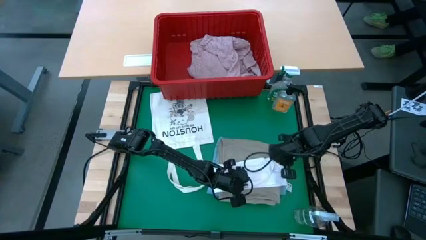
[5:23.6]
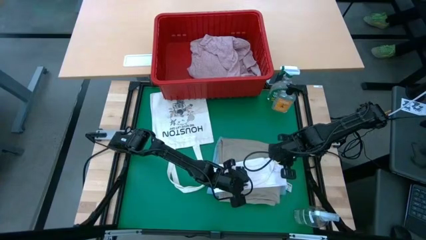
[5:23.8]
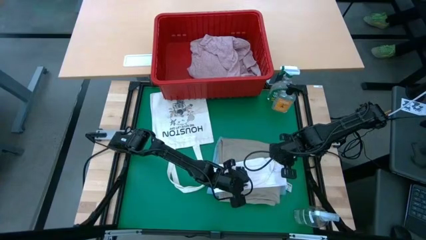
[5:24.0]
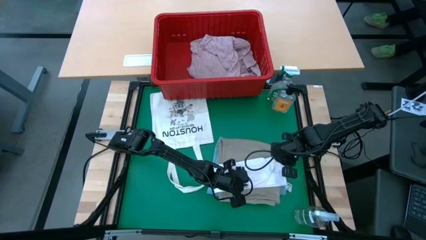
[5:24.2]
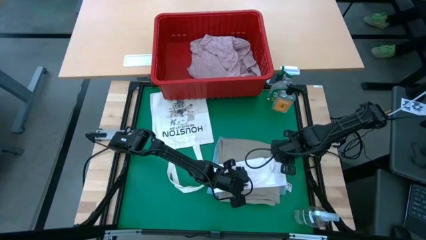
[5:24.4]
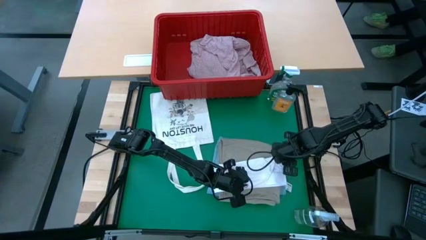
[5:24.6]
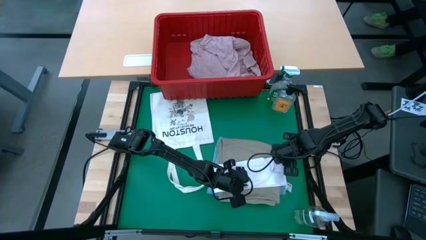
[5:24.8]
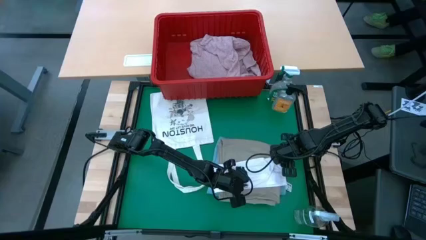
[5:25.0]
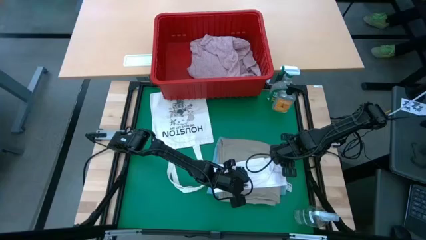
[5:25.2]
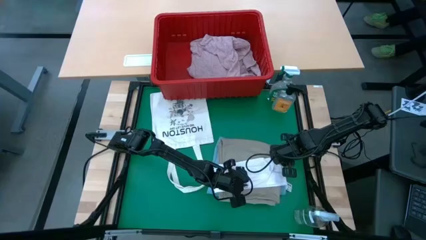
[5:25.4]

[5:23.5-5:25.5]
Task: Fold laundry
Fold the white underwear

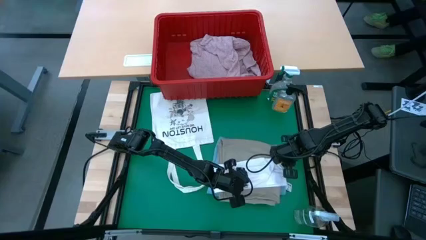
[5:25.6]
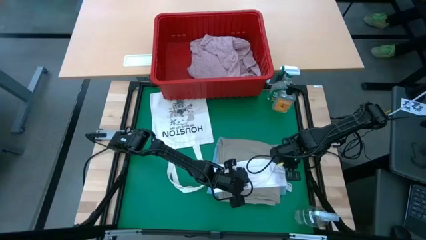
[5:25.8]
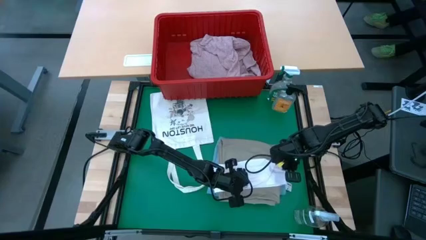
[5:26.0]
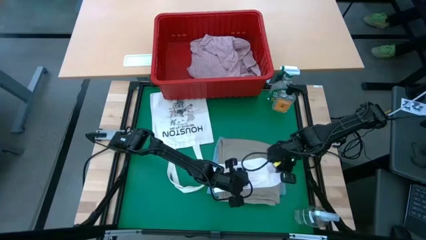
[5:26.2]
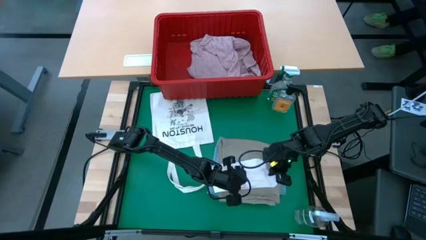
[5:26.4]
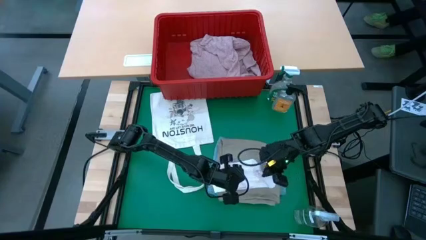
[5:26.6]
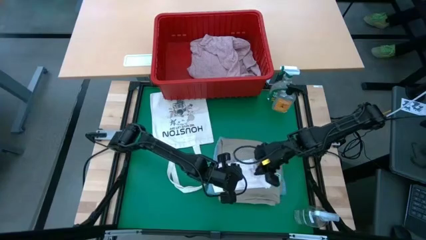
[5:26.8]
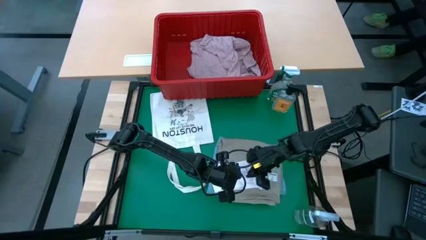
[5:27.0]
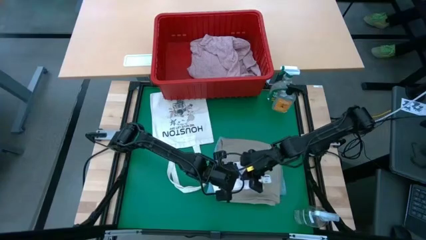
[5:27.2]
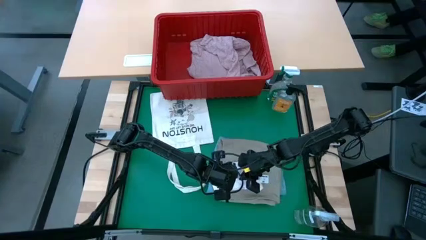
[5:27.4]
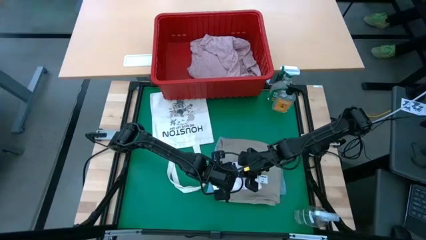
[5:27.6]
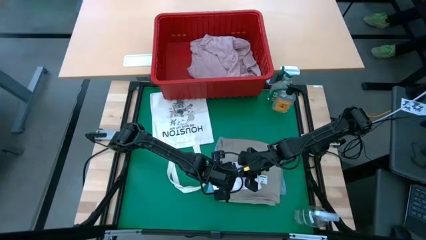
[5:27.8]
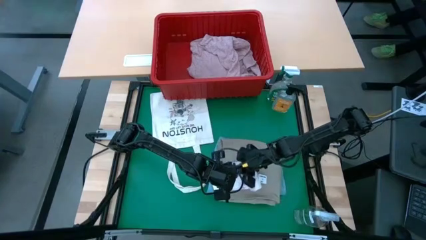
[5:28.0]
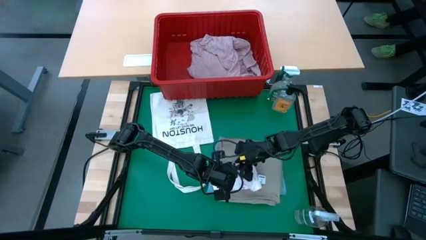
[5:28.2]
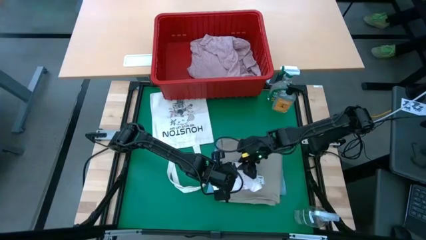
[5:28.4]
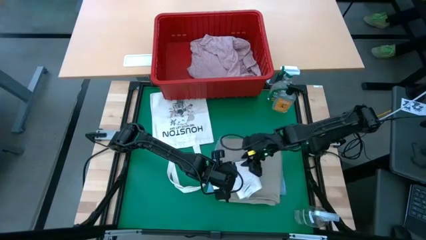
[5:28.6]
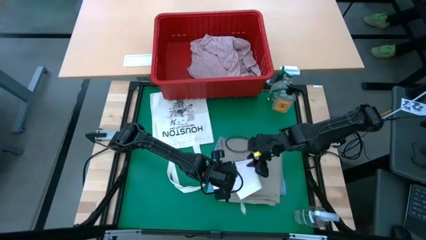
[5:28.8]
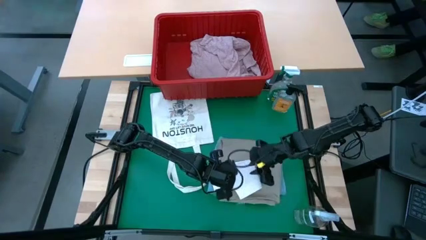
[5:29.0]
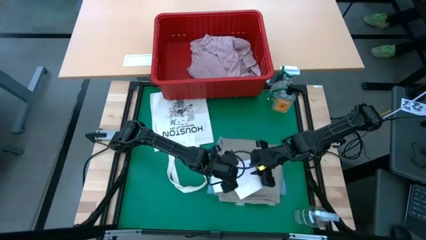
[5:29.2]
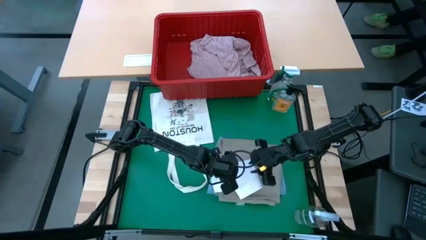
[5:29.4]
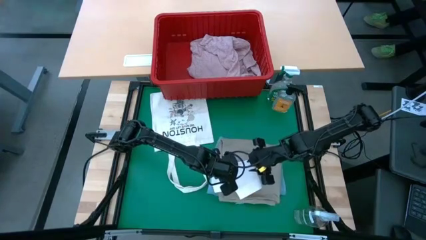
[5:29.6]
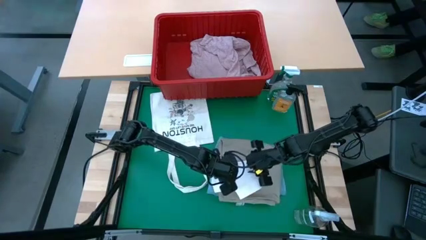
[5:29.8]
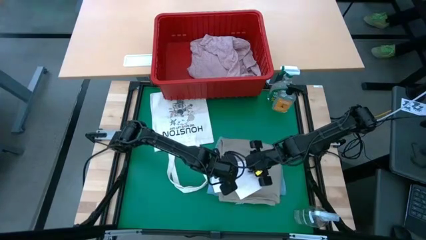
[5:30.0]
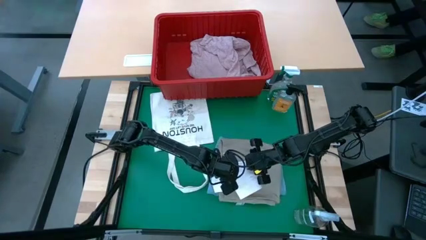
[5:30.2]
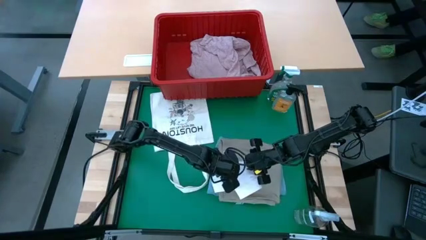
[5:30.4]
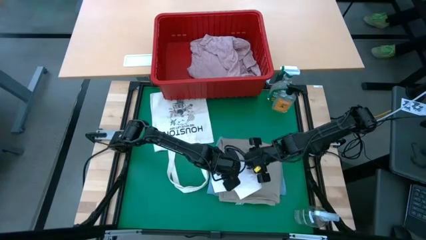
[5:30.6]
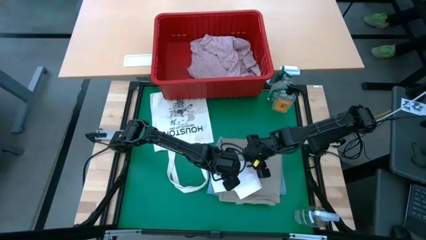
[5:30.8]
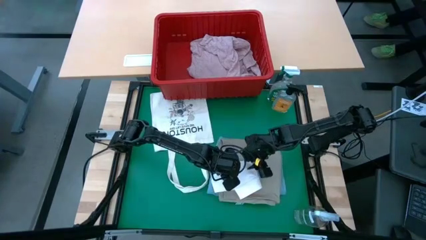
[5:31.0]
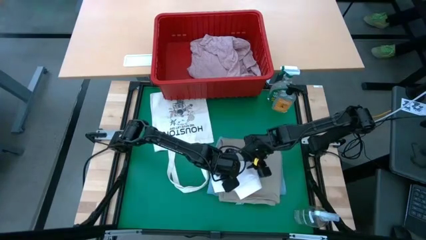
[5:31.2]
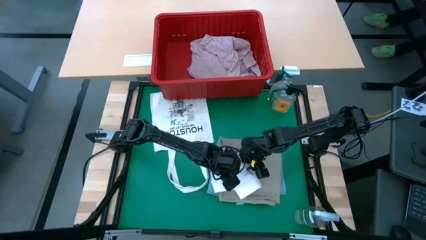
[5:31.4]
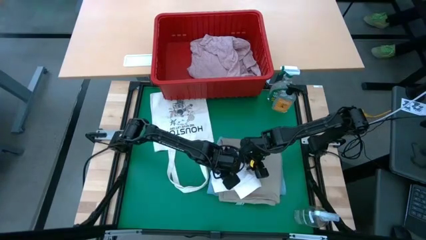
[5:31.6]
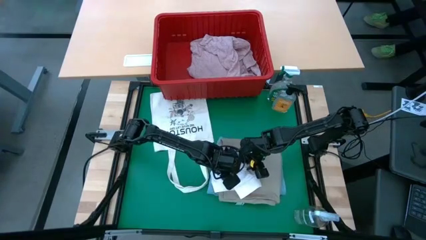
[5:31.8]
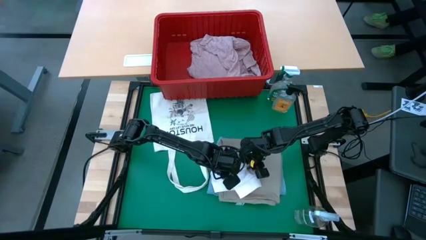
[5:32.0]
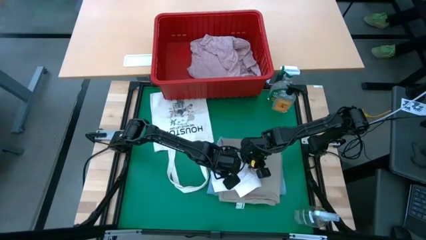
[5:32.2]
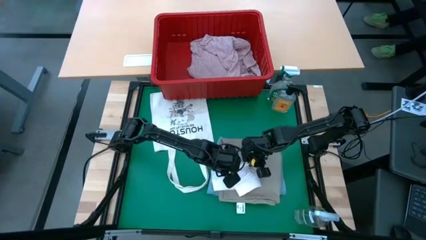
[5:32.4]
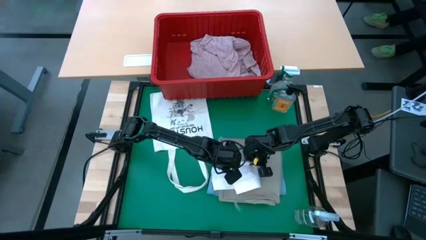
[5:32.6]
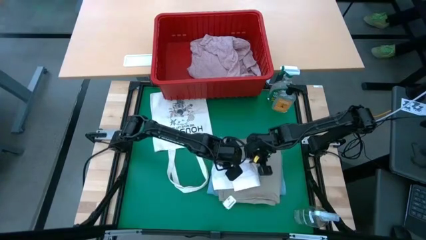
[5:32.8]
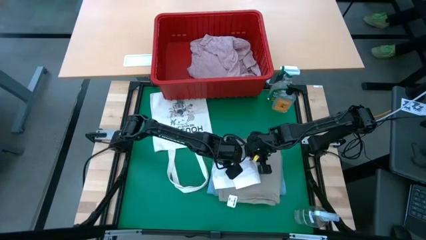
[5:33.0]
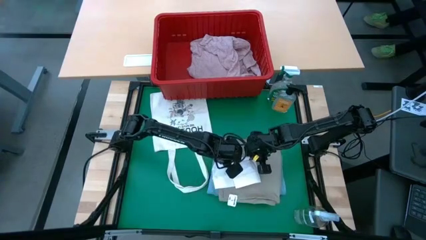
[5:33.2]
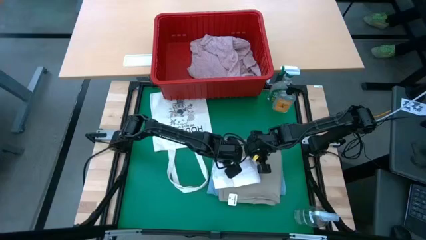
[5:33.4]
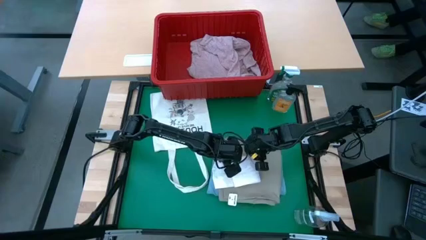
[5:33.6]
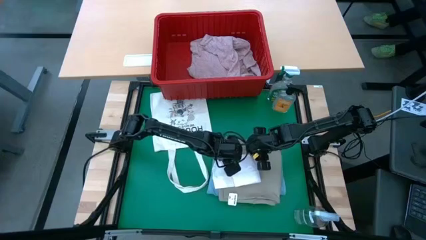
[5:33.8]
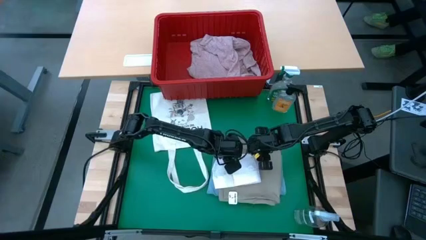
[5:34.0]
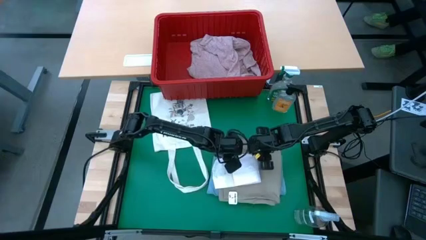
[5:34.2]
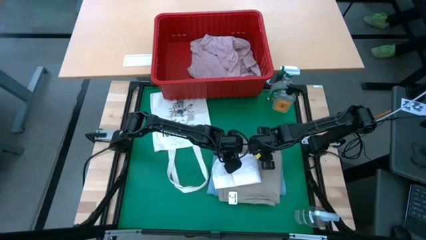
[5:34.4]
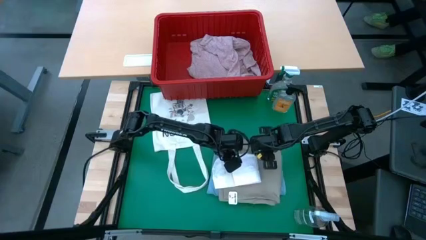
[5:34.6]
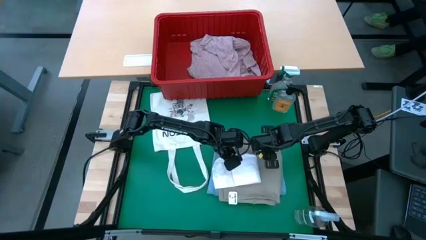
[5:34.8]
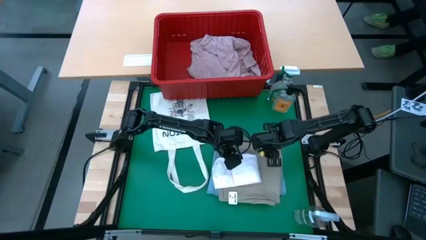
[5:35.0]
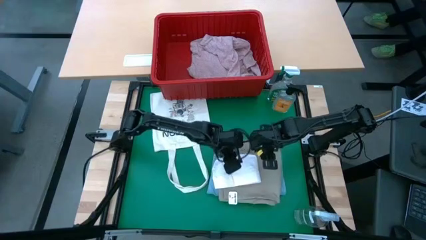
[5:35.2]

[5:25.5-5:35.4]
Fold the white underwear
